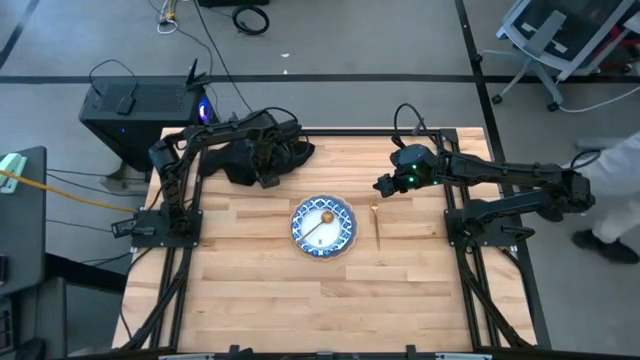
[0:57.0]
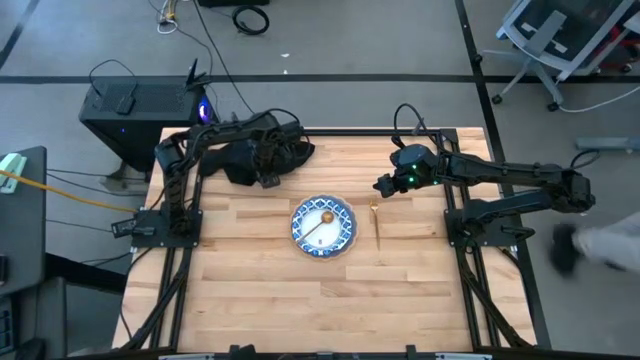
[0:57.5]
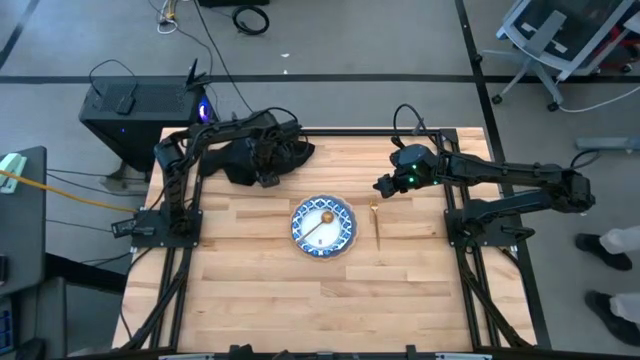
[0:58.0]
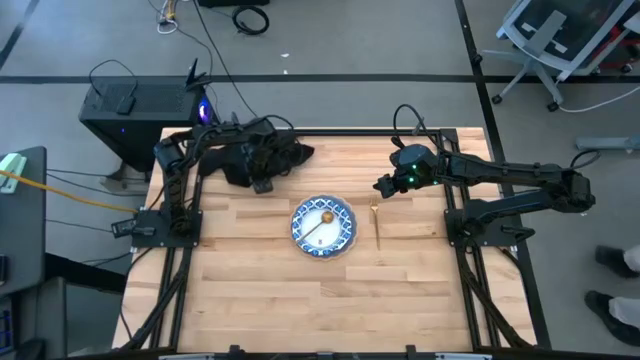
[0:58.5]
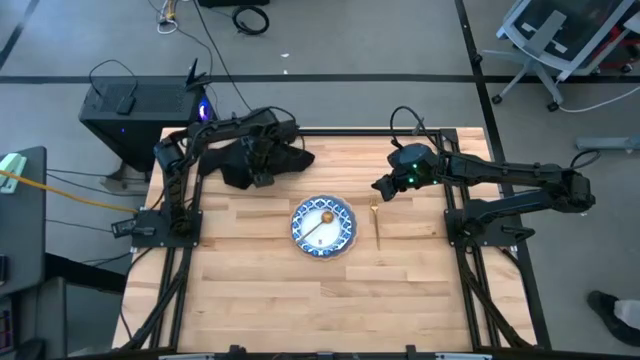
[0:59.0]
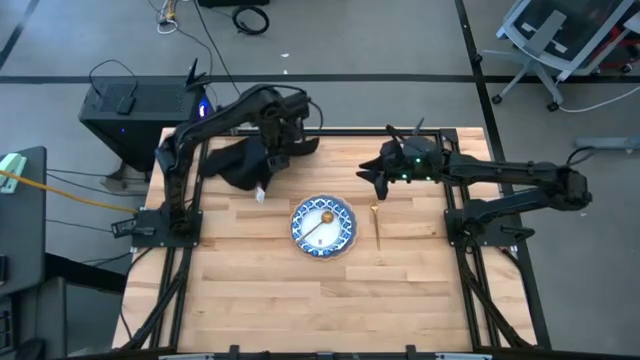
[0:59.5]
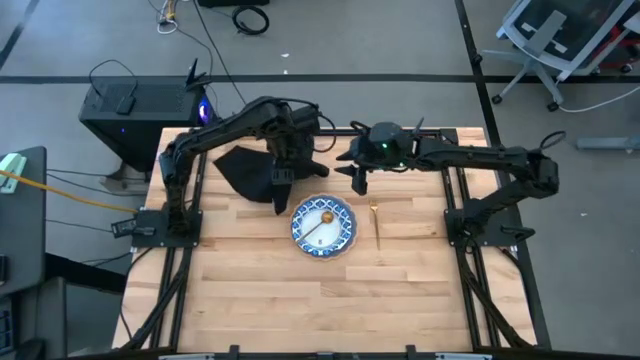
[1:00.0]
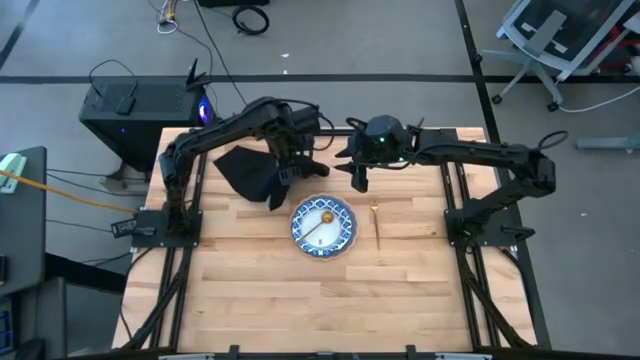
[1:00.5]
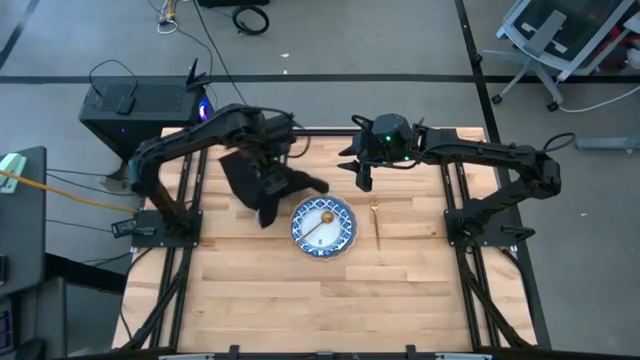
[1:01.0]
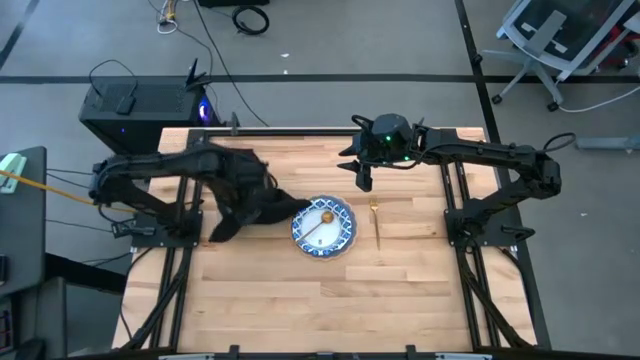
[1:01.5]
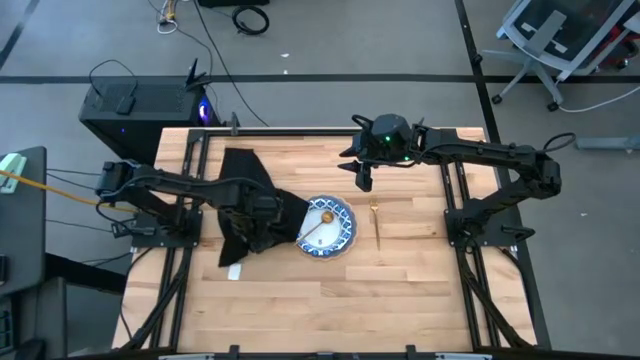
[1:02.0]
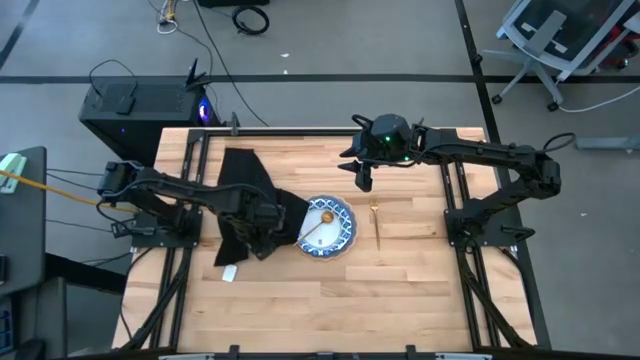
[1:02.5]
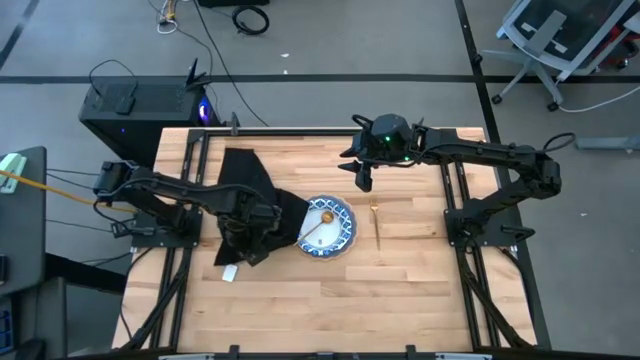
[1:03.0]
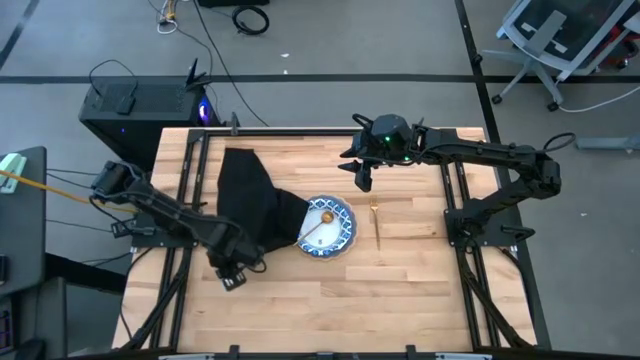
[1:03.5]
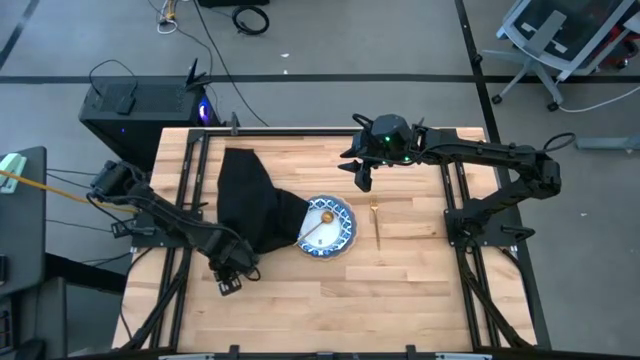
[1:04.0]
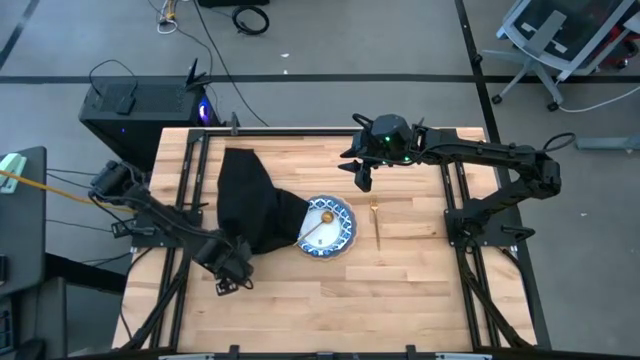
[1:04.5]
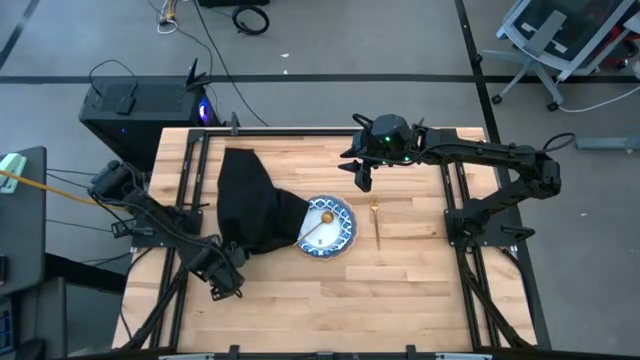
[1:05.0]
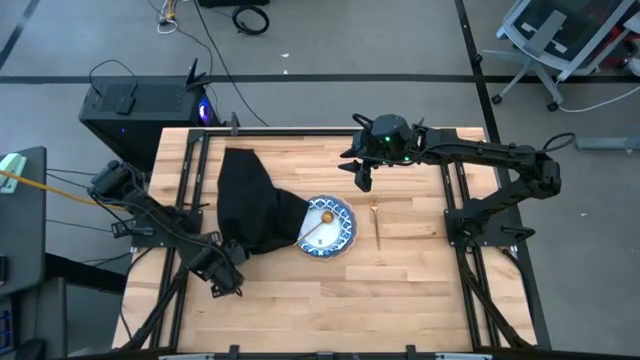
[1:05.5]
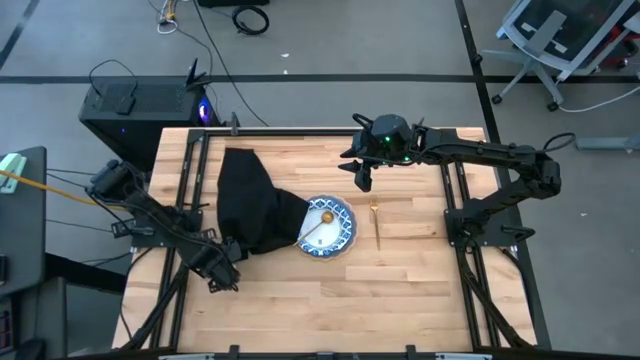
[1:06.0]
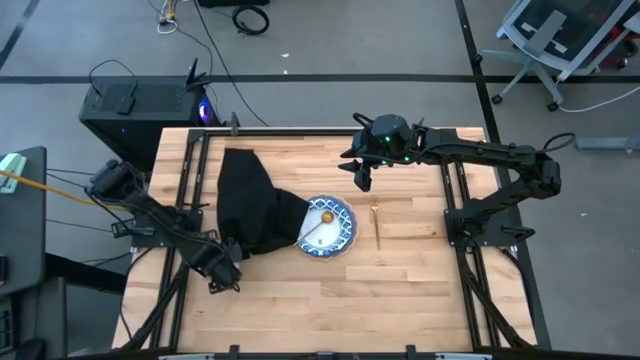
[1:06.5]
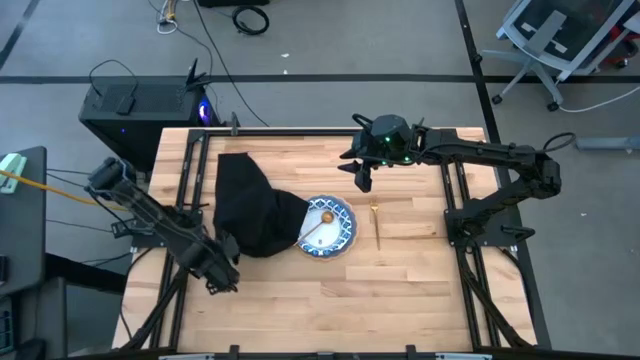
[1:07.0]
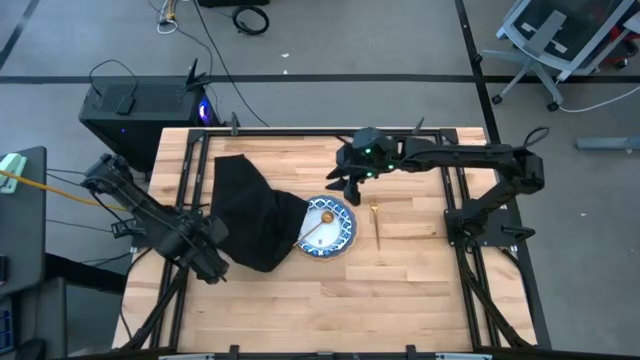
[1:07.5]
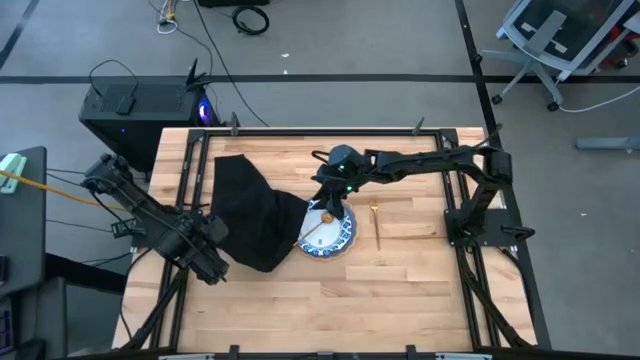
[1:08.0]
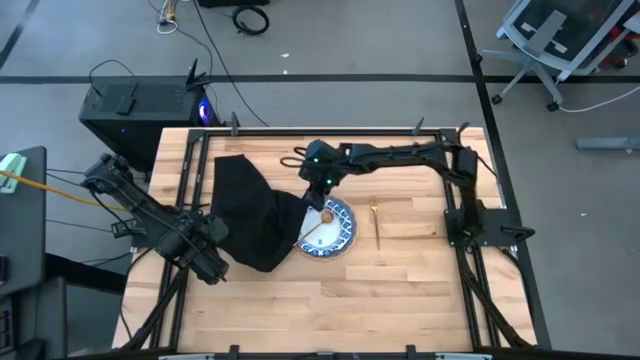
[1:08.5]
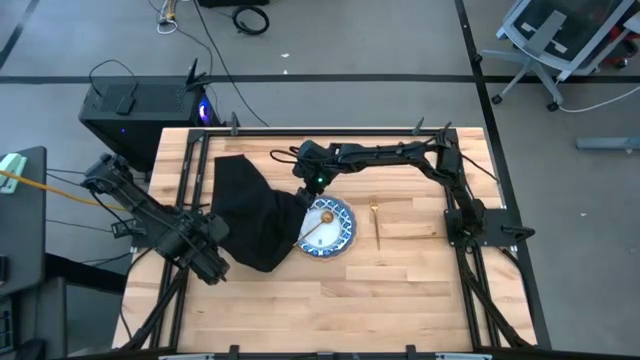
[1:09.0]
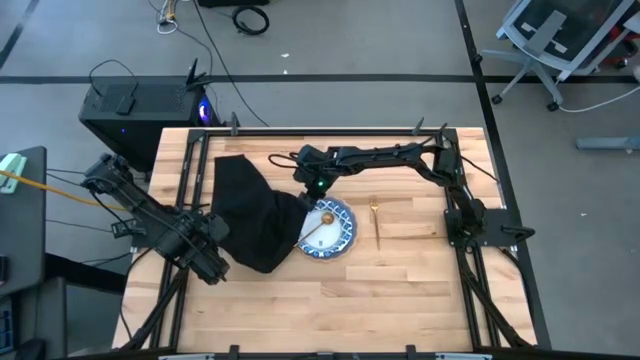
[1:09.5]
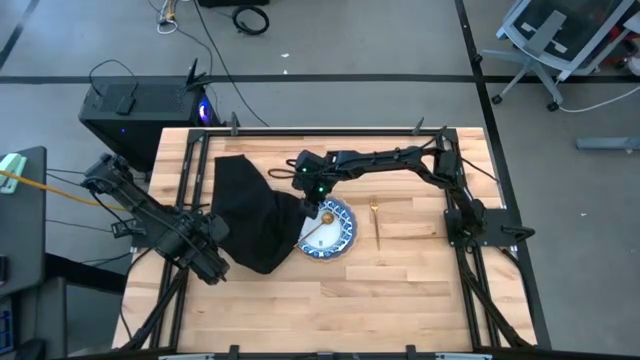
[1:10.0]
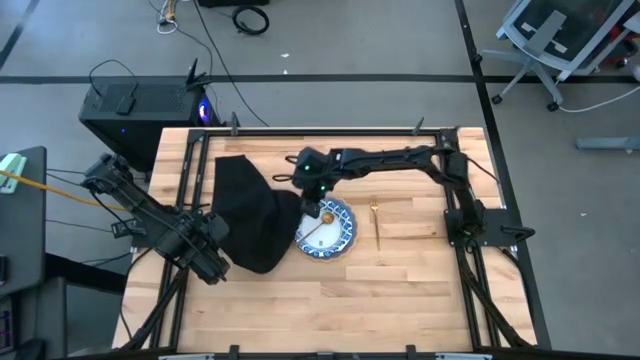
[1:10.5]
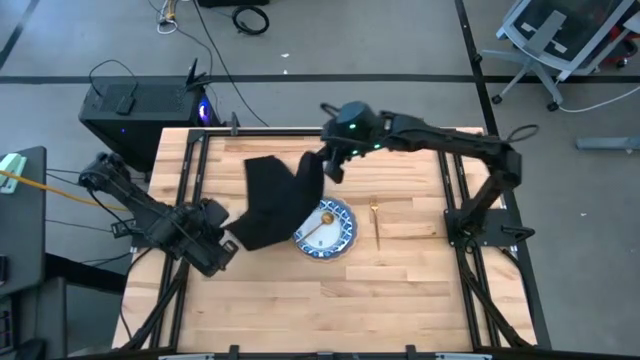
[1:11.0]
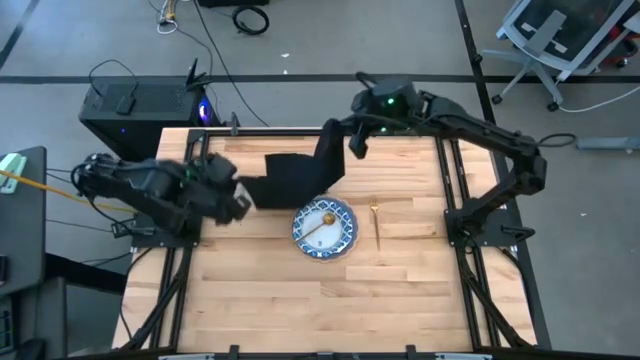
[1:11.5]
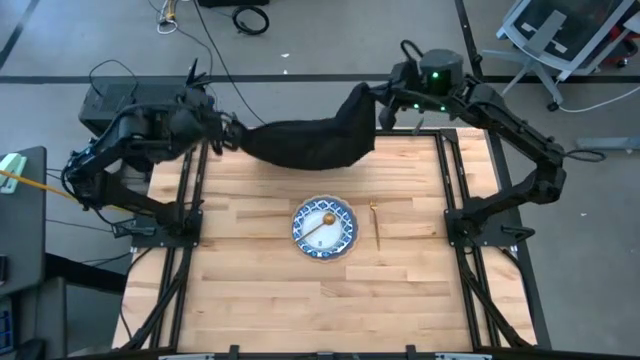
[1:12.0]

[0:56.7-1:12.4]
Task: Set table place
Fold the black napkin

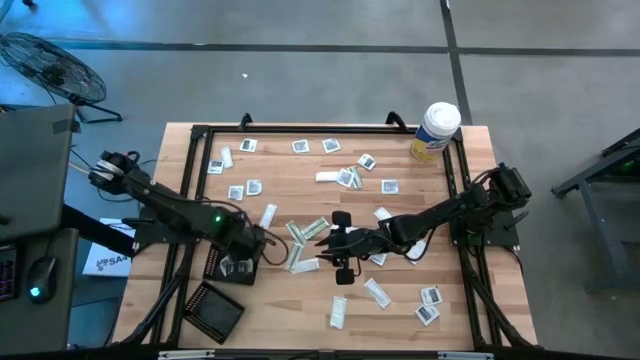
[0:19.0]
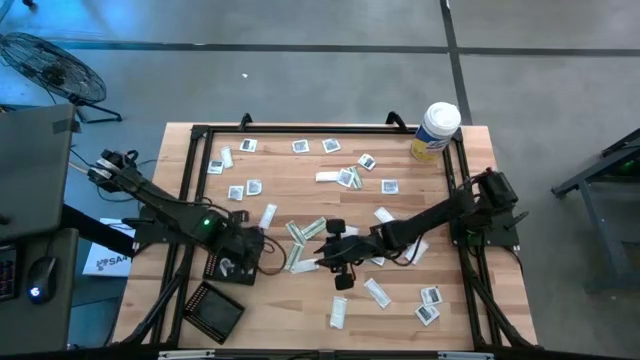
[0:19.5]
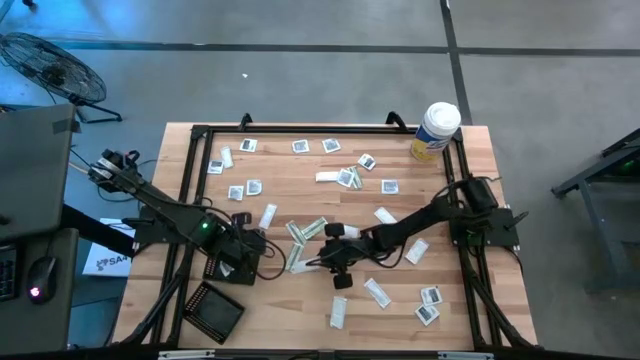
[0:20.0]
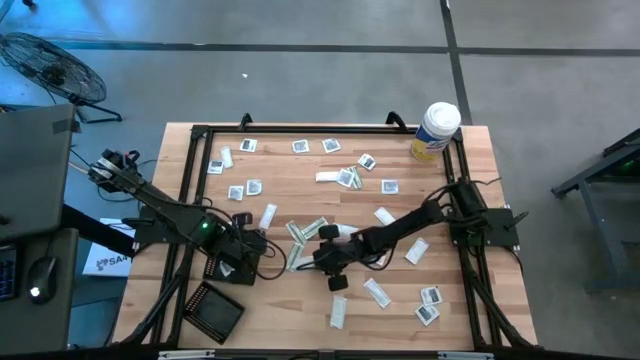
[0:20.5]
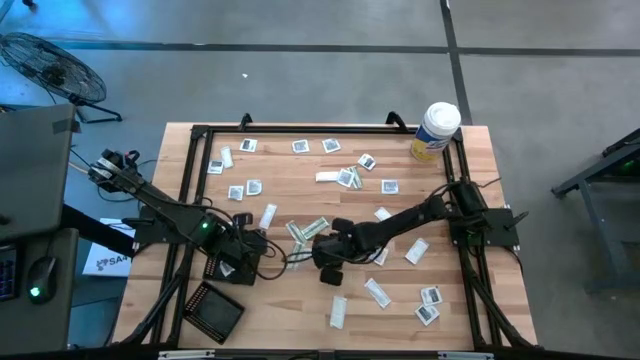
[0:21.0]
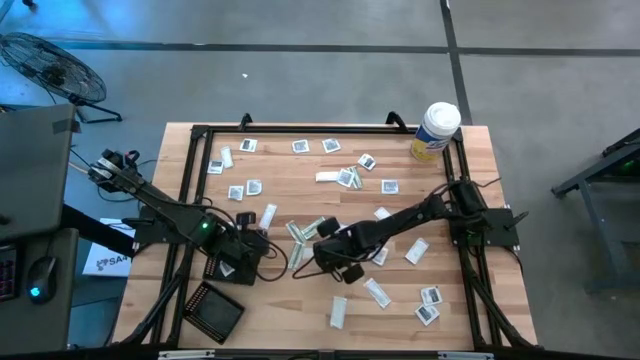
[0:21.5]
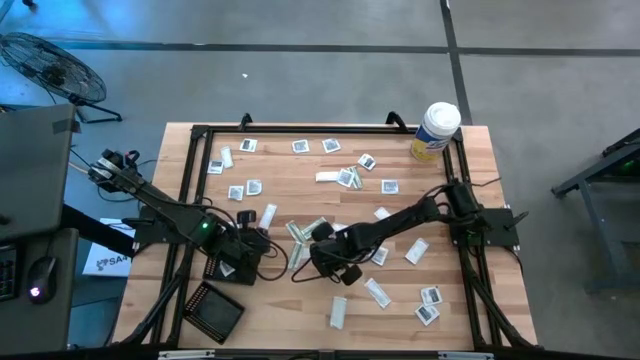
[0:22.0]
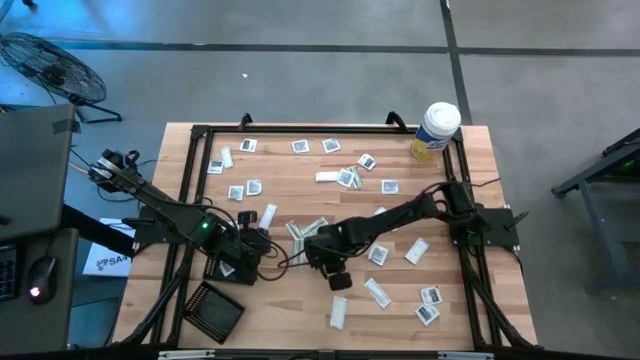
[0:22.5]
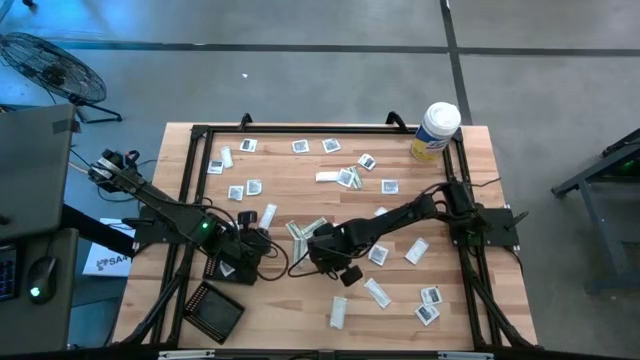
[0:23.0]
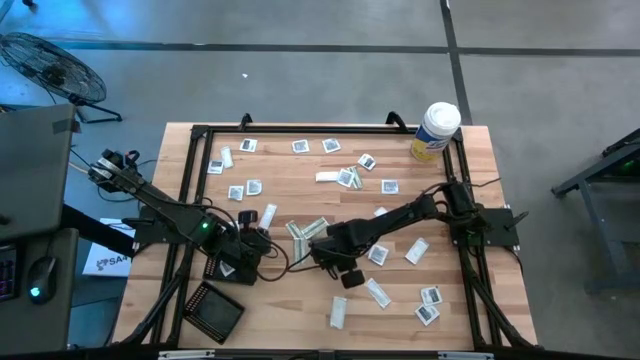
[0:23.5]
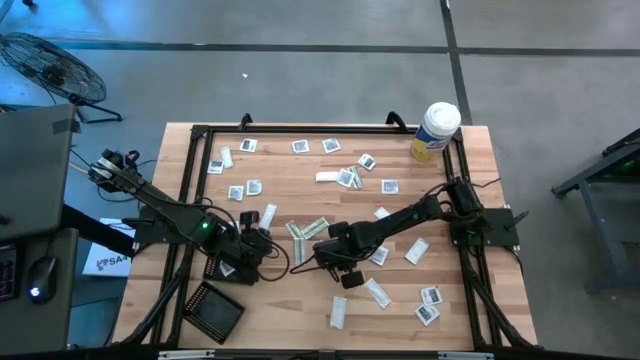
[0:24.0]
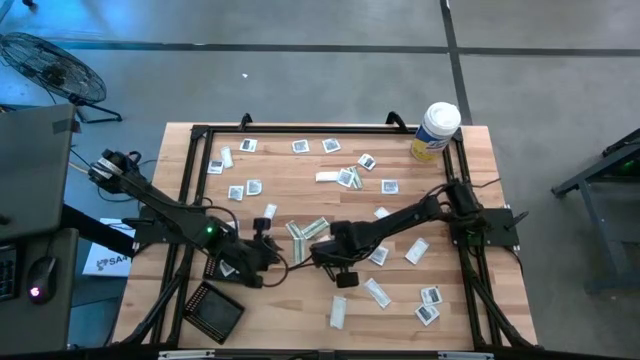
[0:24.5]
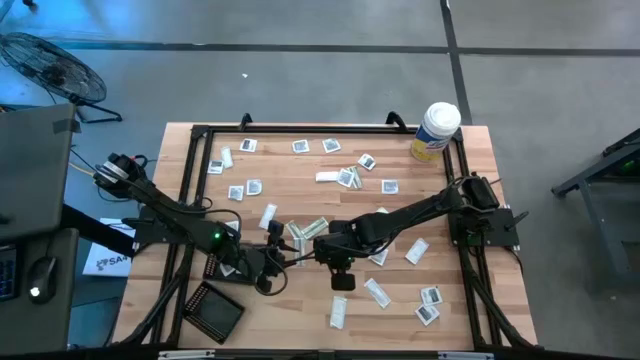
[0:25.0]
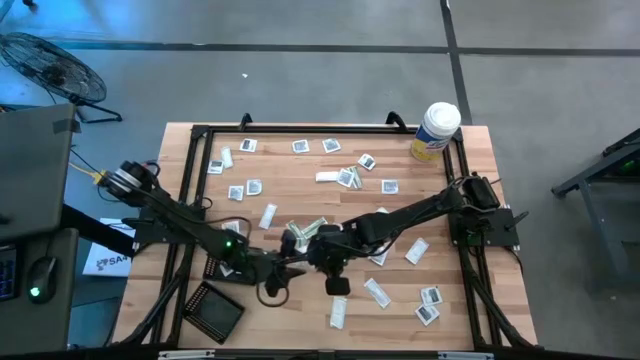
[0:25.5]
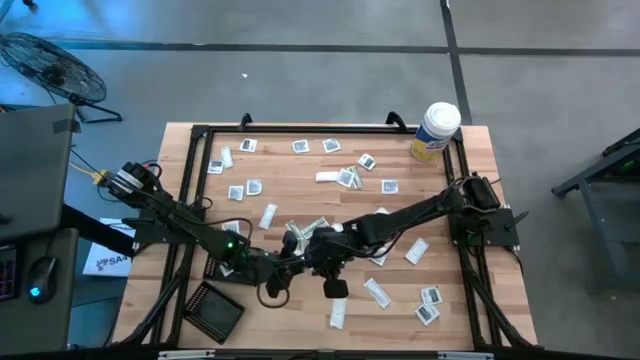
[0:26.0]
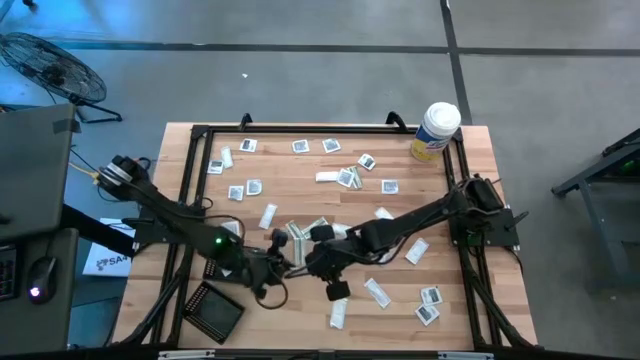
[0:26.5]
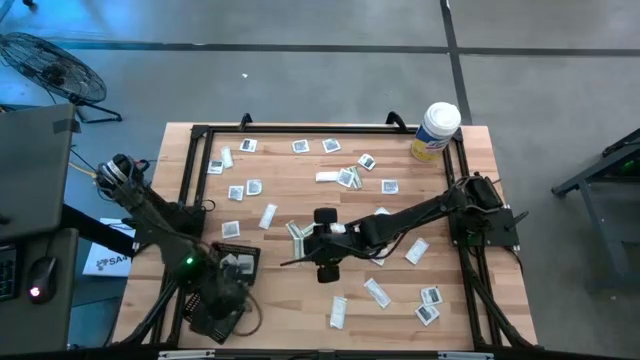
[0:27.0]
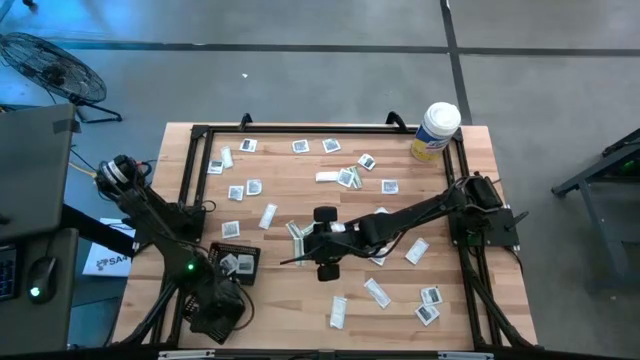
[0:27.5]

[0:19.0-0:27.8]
Task: Pick & Place First Aid Supplies
Put the bandage into the bottom black bin
